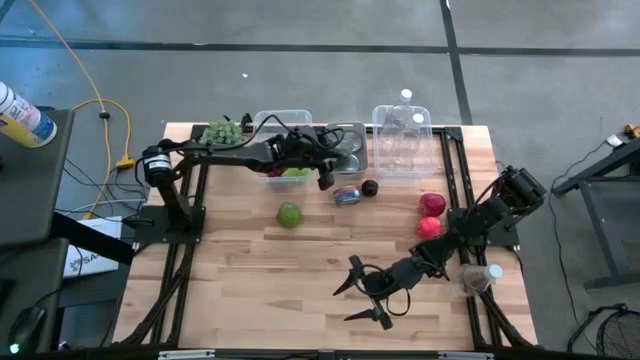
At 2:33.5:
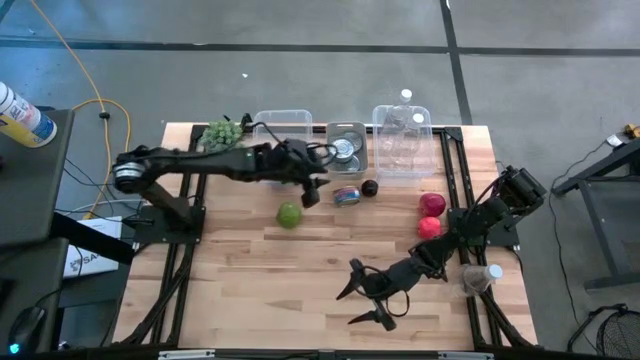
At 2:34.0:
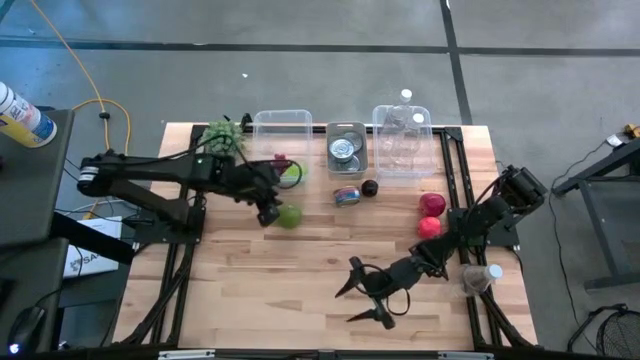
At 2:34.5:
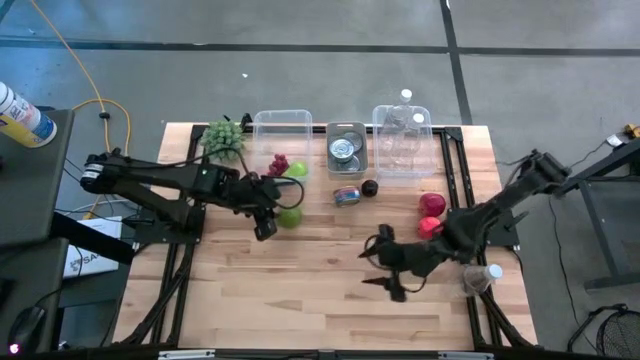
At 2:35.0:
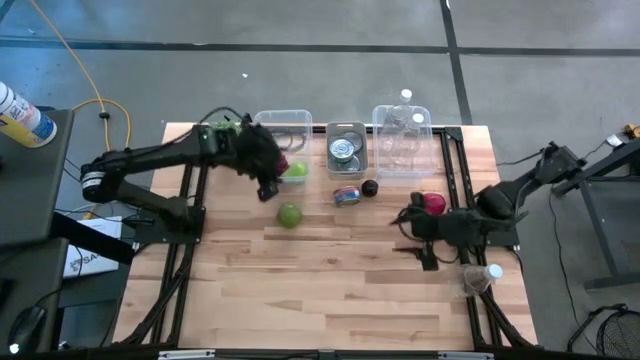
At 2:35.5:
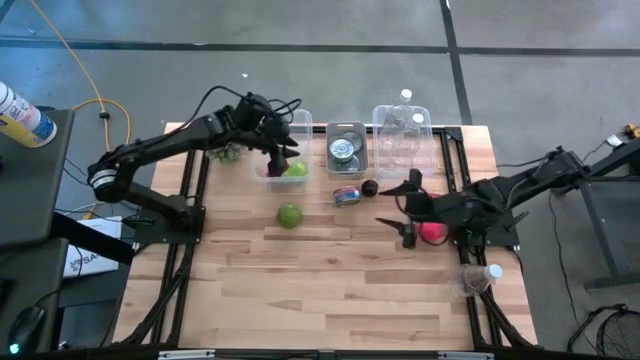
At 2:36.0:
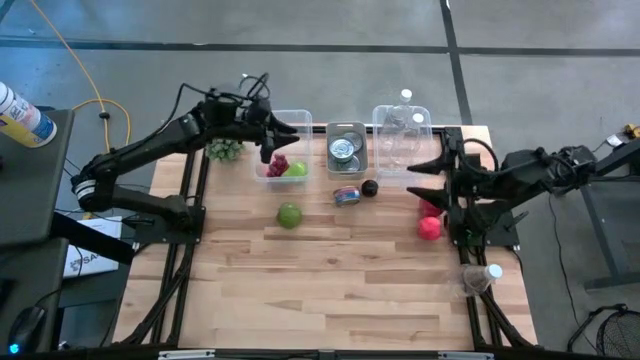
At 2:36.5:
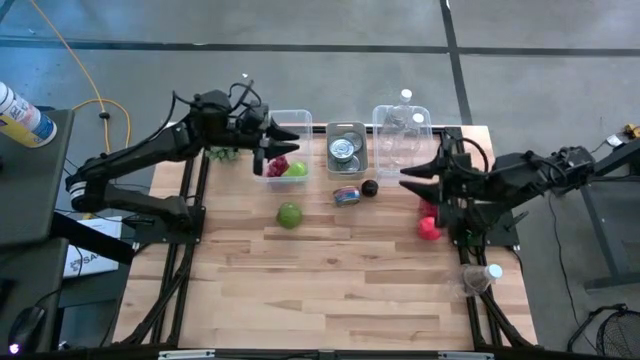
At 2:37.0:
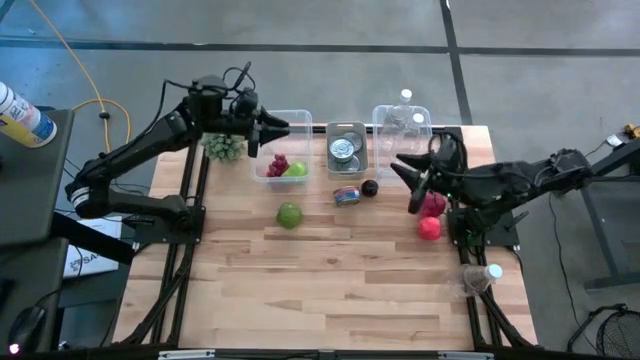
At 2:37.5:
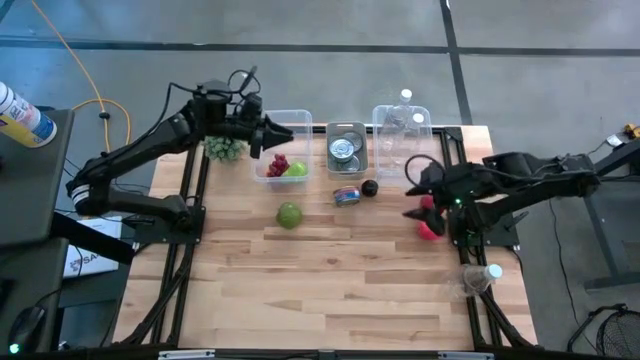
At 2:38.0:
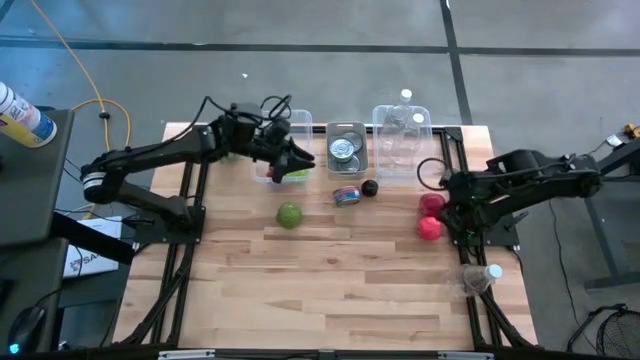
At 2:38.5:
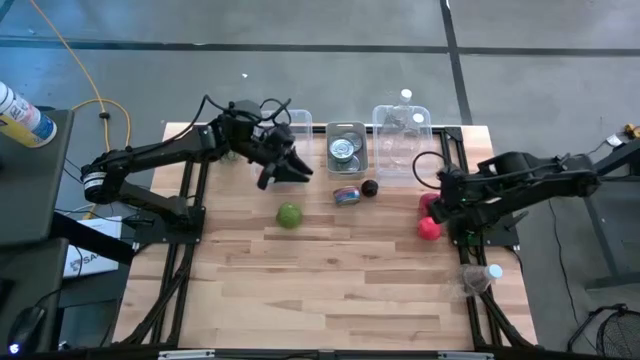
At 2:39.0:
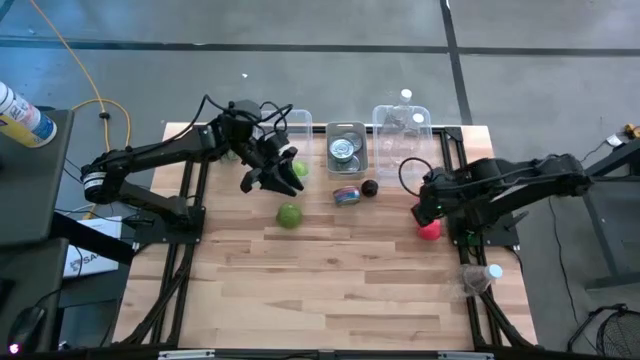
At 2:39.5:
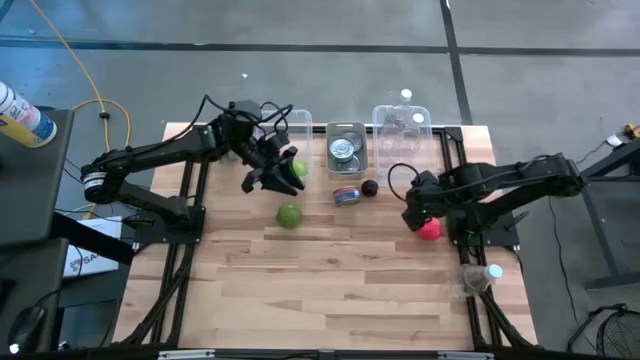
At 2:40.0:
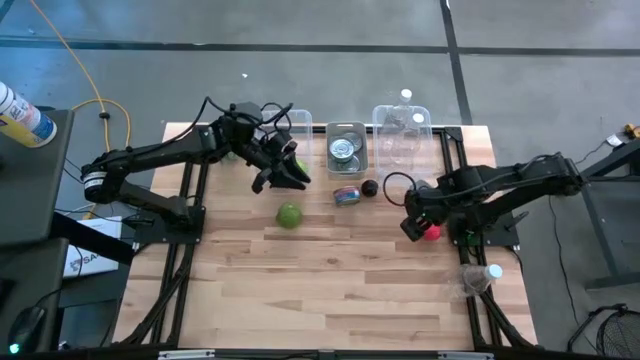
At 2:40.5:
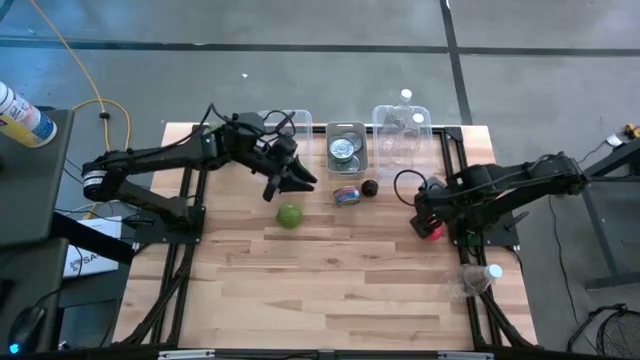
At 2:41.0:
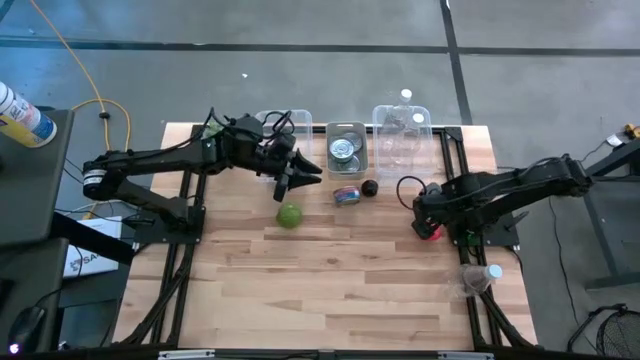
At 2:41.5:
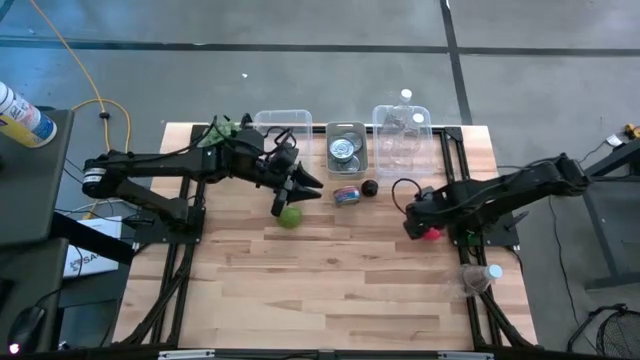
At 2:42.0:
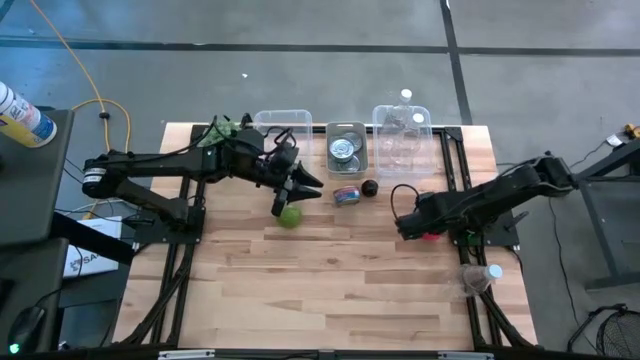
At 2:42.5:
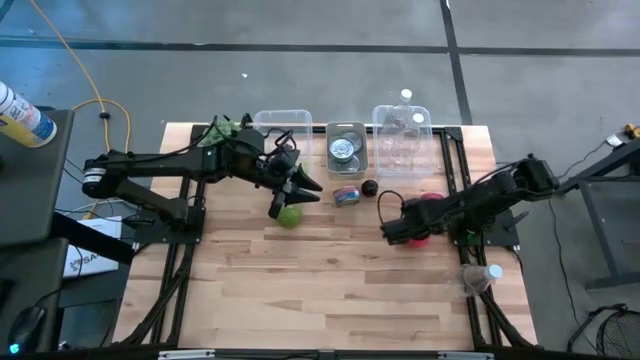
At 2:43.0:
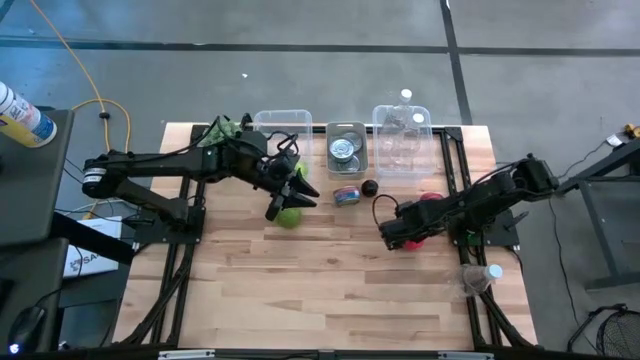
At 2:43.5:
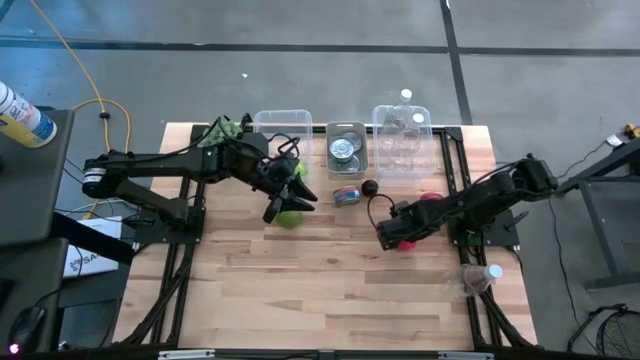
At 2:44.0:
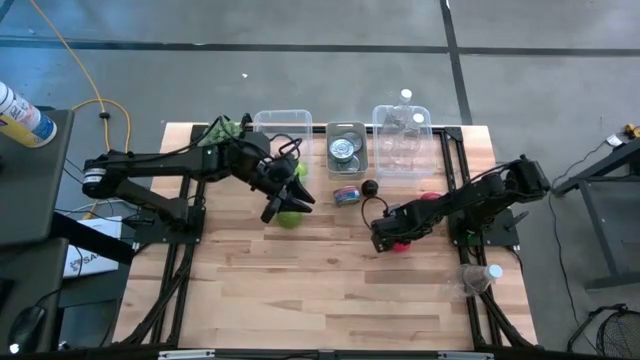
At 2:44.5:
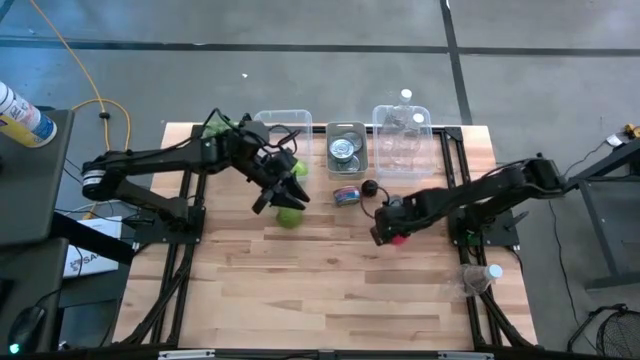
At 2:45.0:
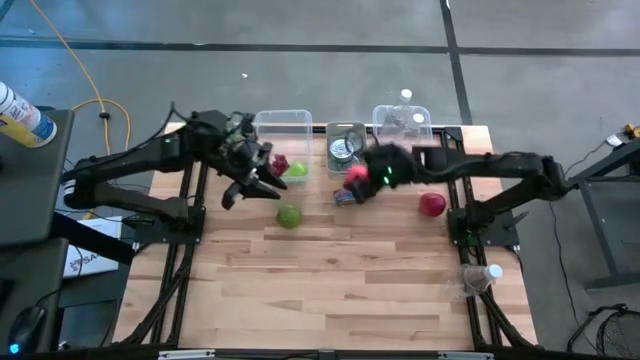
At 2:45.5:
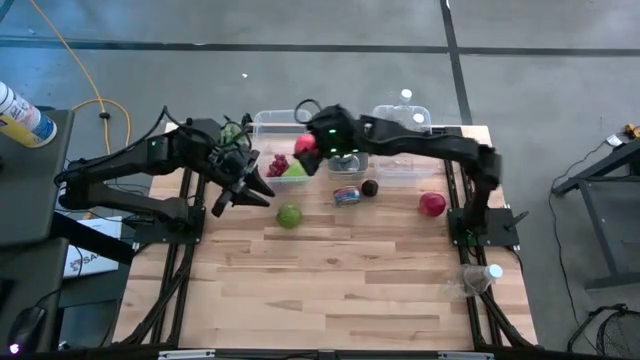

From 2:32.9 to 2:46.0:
Task: Pick & Place Food Item
Put the red apple into the left transparent bin

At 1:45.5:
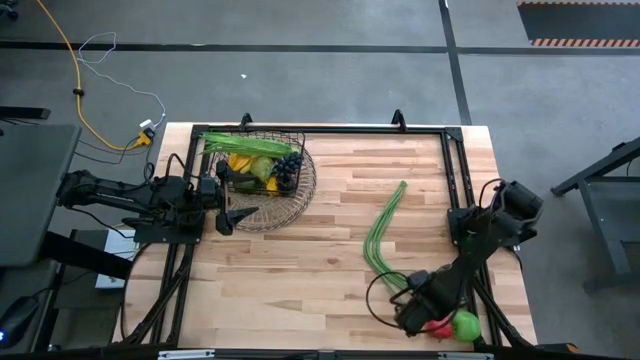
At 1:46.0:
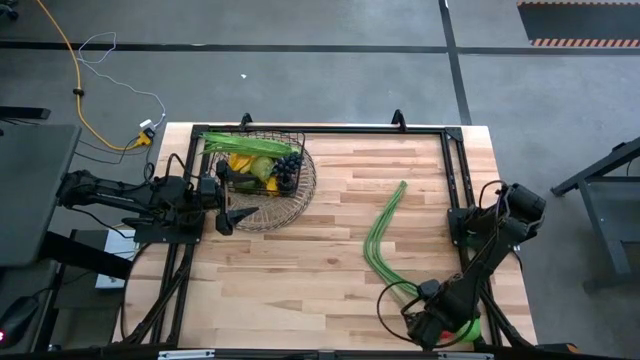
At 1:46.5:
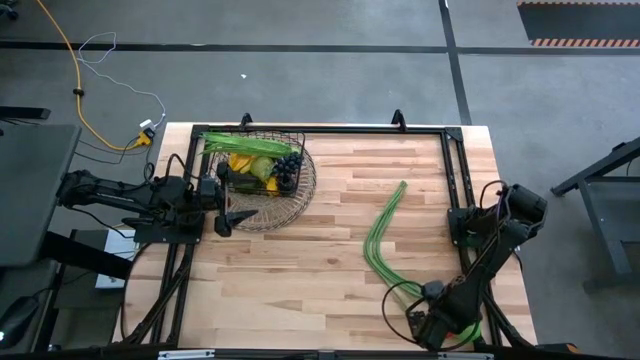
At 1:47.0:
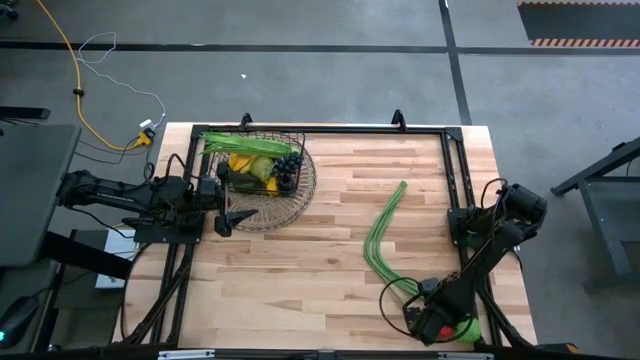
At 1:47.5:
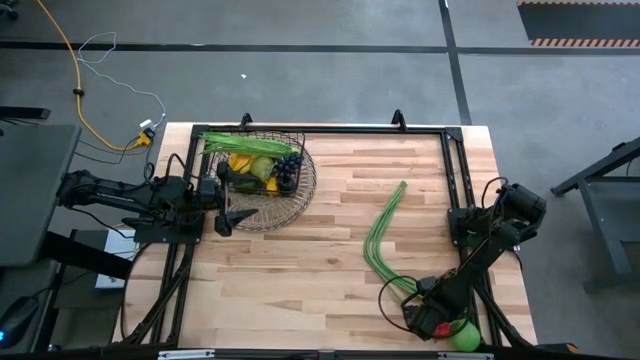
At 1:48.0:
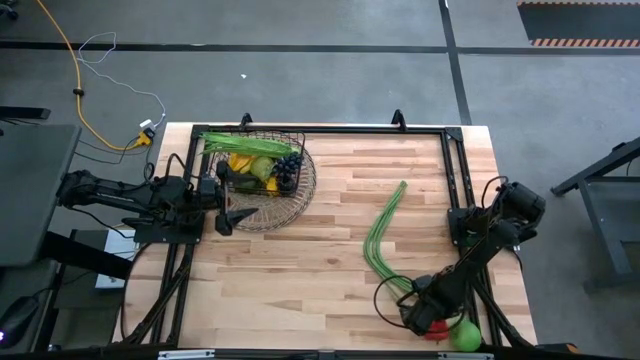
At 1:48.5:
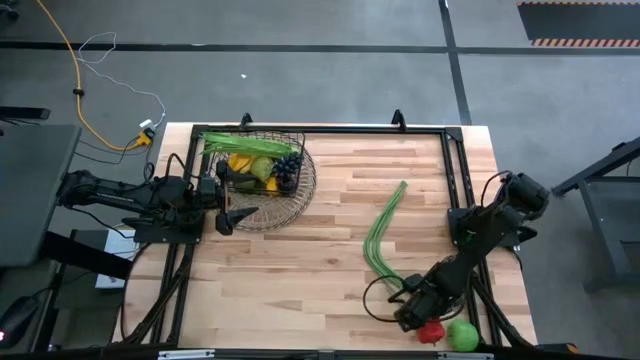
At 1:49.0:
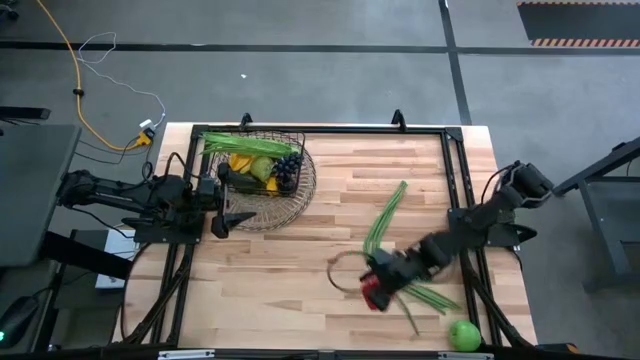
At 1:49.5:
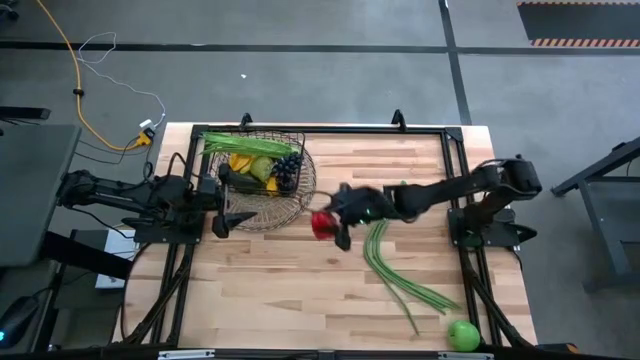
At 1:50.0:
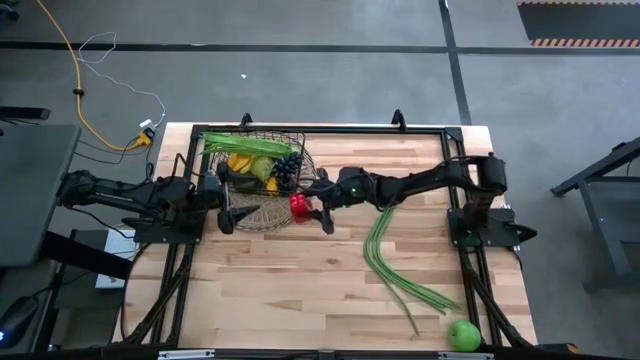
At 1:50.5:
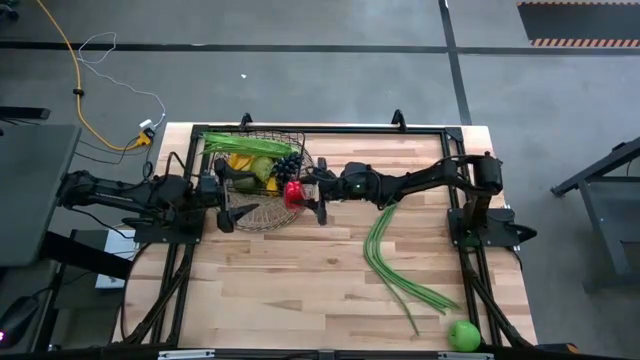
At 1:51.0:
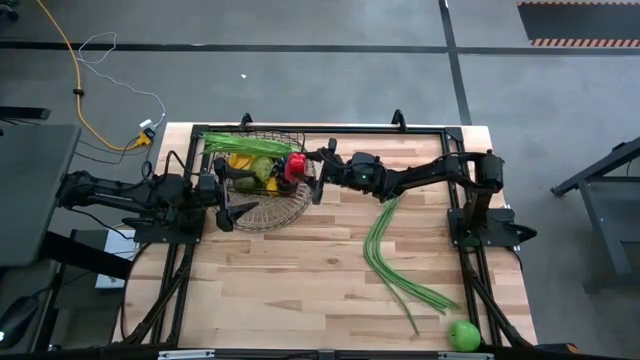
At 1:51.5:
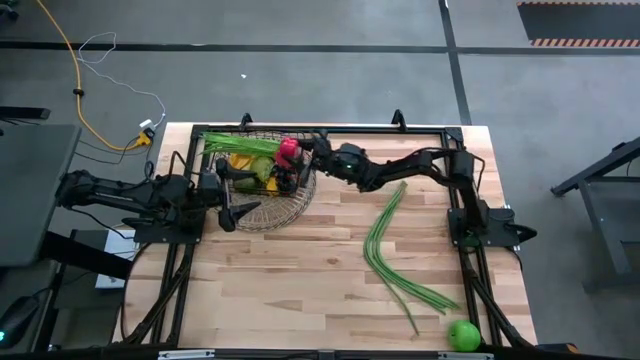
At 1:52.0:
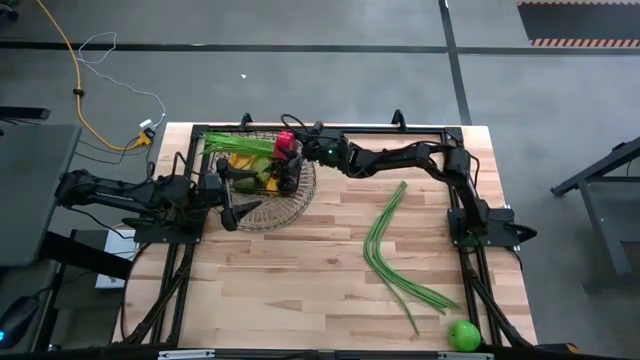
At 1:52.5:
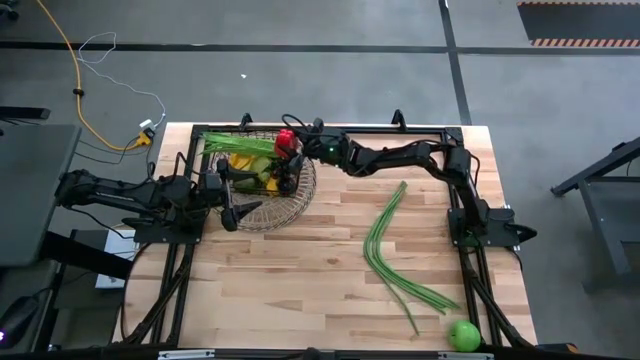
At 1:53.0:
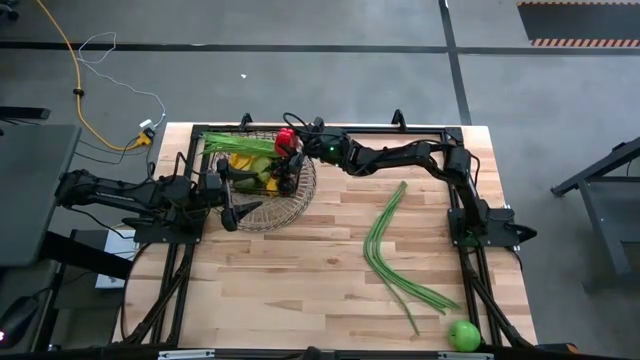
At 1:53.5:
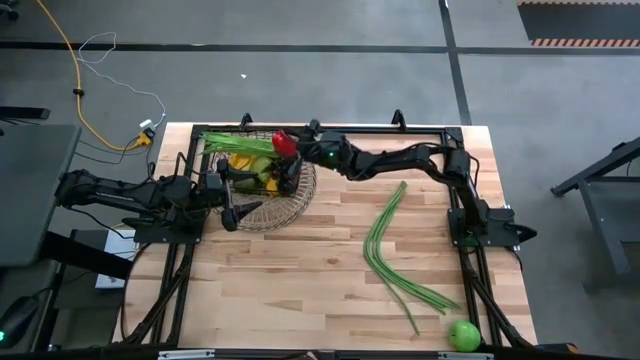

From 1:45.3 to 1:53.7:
Task: Build produce basket
Put the red chili pepper into the wire basket
